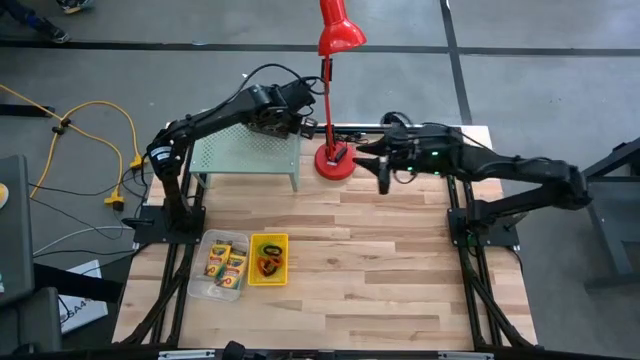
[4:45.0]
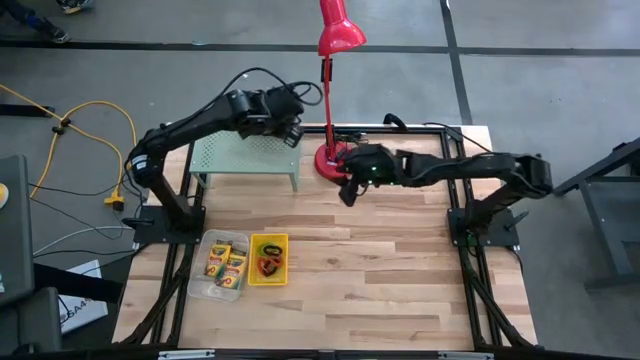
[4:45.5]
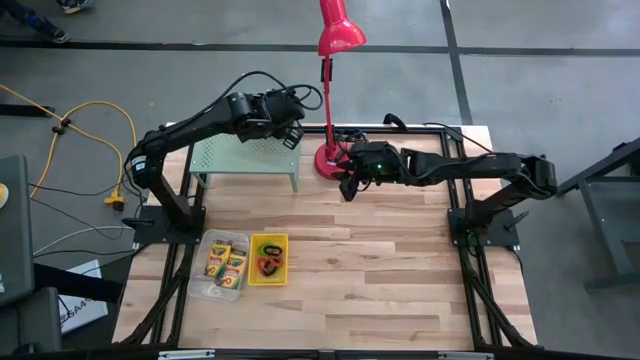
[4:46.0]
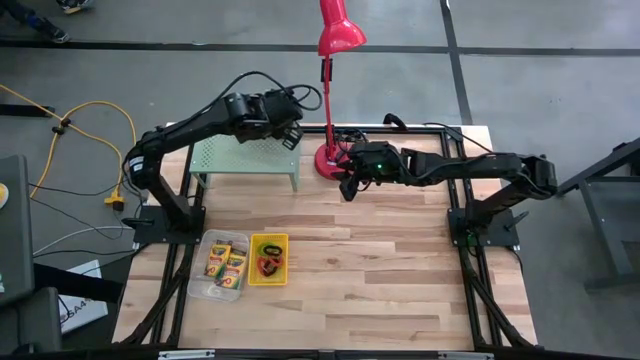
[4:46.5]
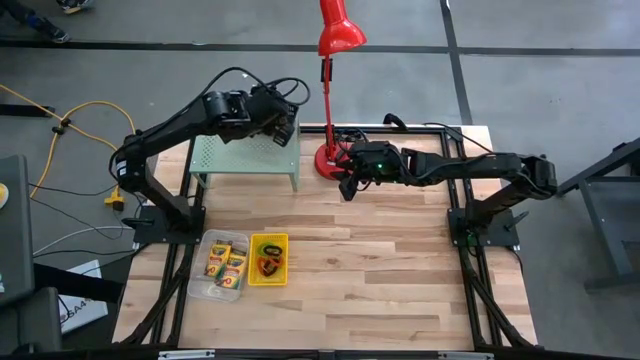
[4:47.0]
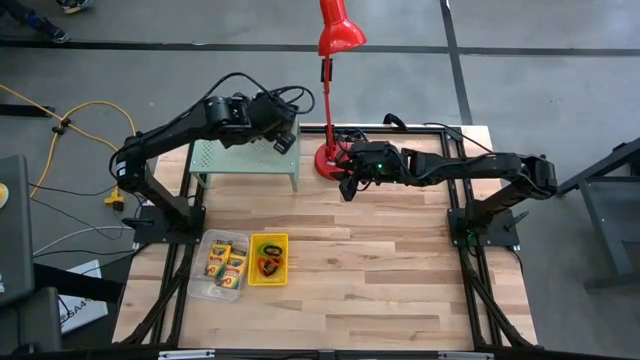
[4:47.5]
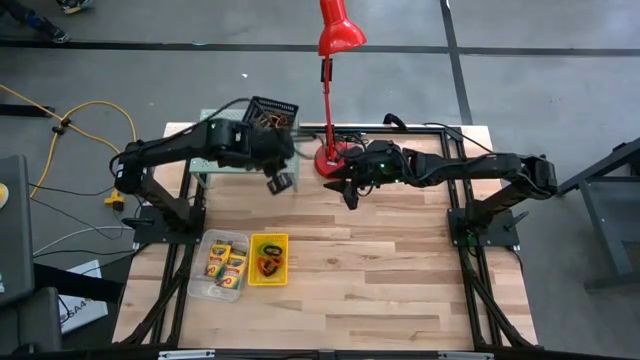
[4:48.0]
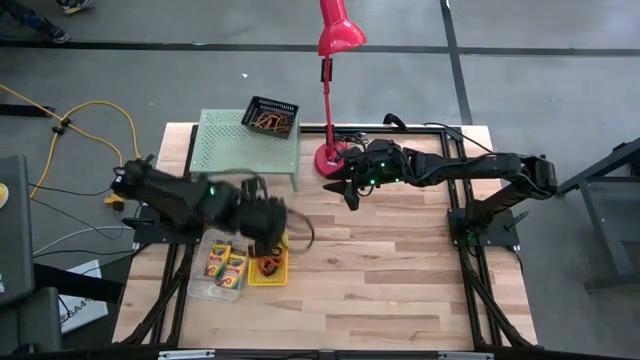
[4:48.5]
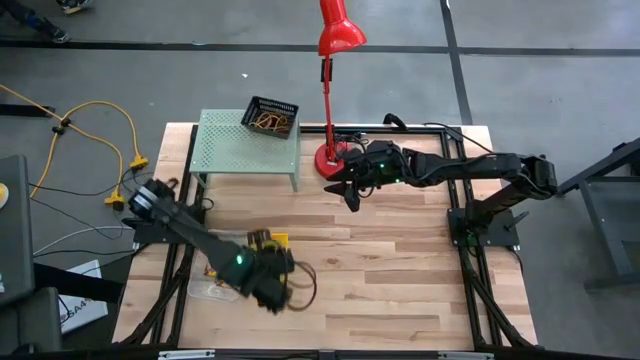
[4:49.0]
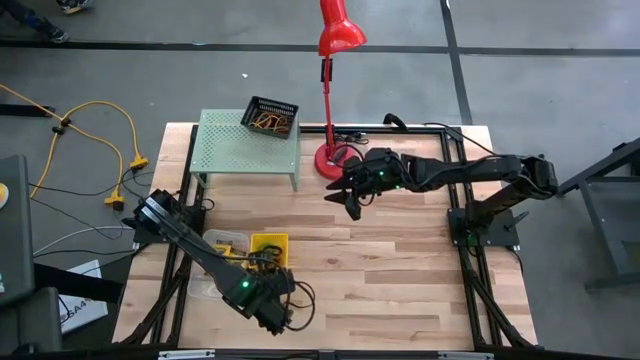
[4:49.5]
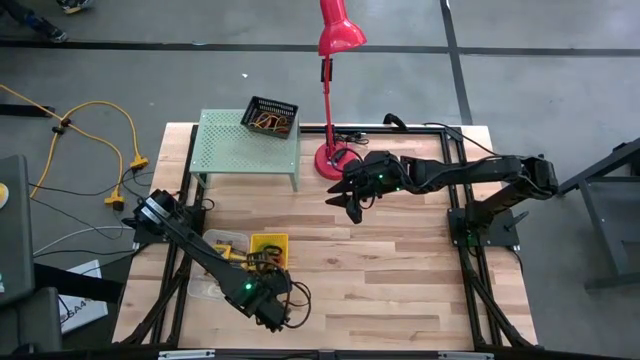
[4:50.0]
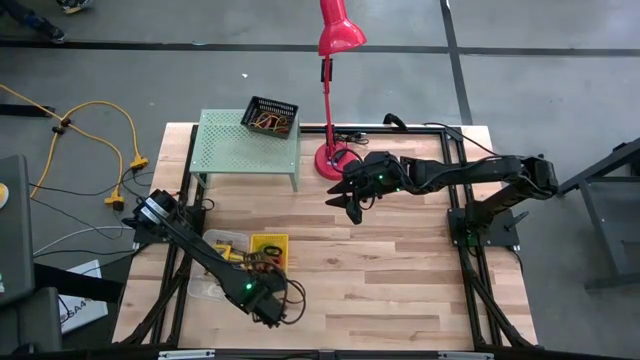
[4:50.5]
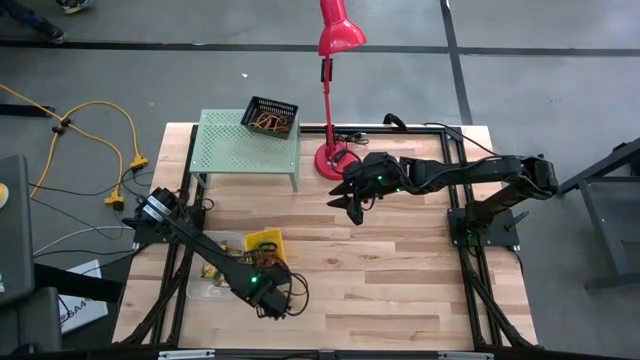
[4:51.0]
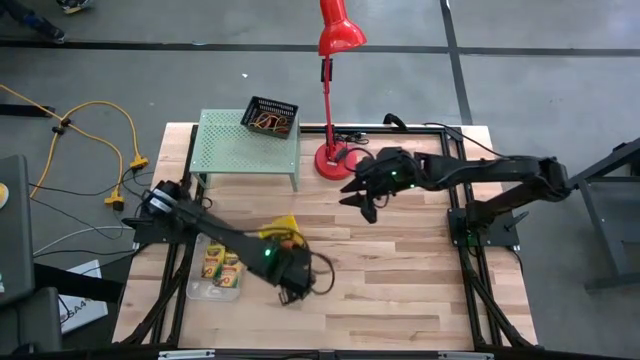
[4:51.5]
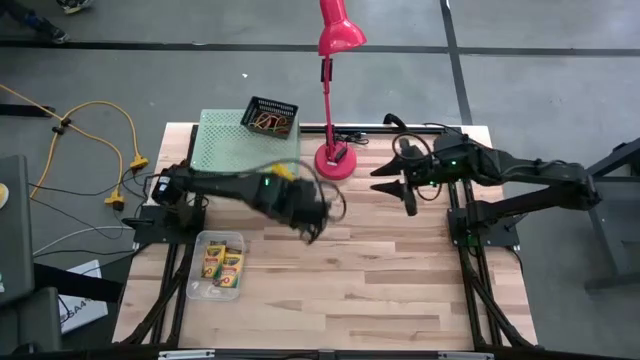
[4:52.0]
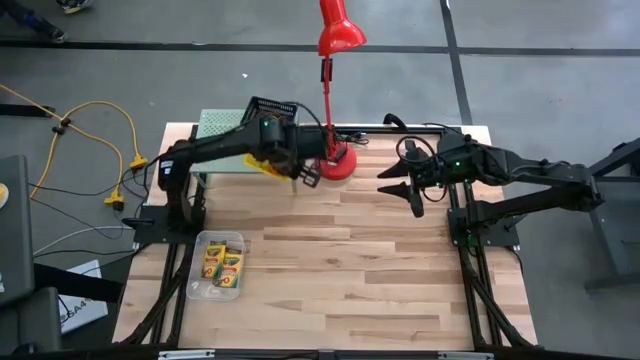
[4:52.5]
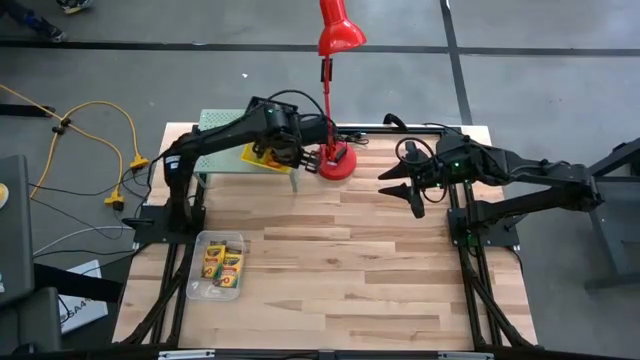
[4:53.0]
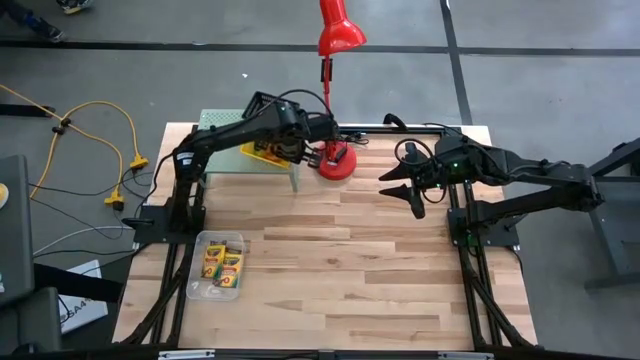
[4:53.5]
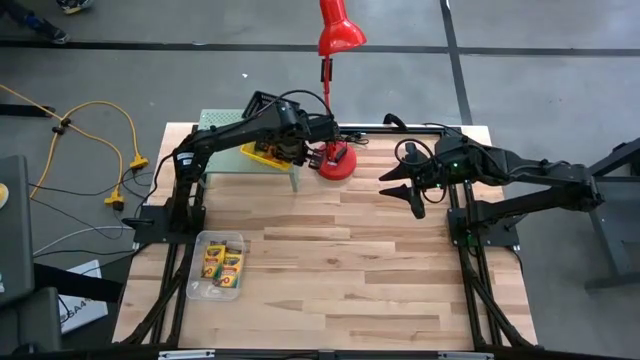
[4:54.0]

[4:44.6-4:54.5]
Task: Pick & Place Office Desk Supplies
Put the yellow bin with spring keychains on the shelf

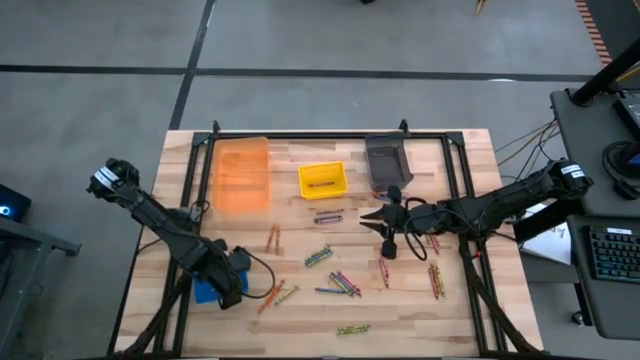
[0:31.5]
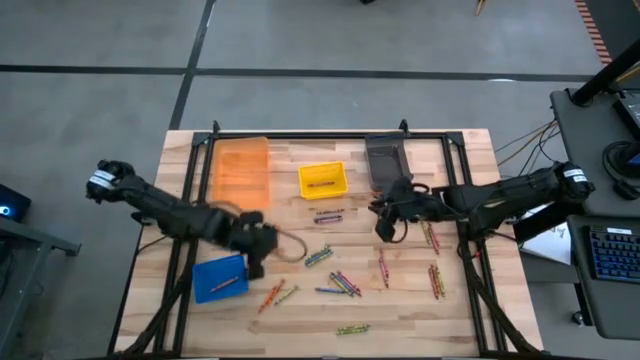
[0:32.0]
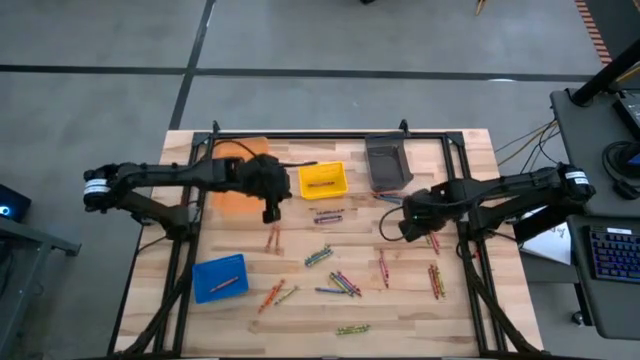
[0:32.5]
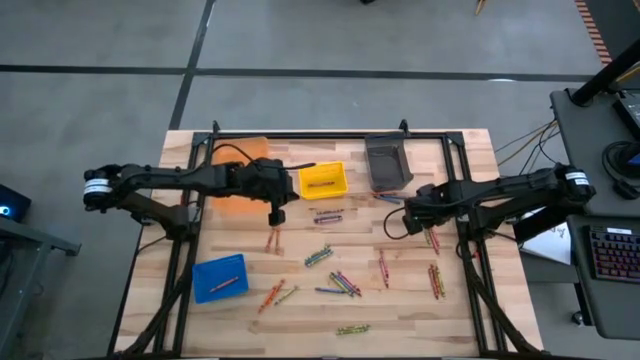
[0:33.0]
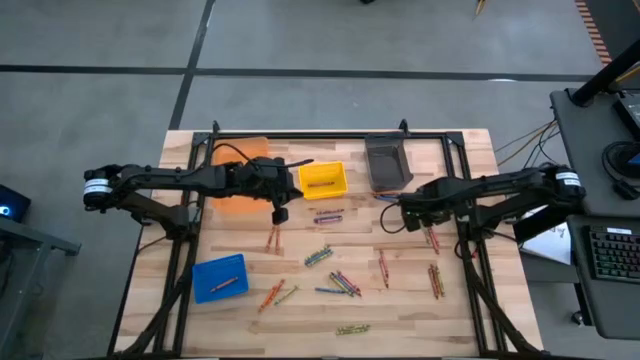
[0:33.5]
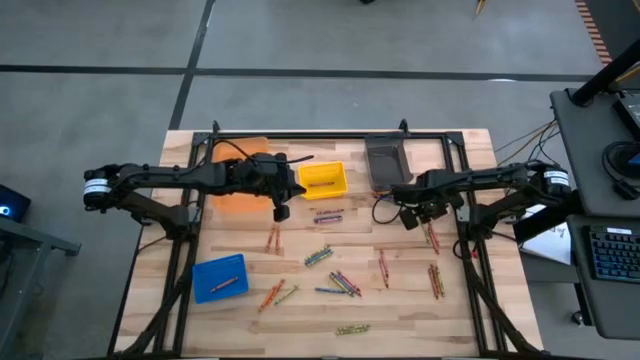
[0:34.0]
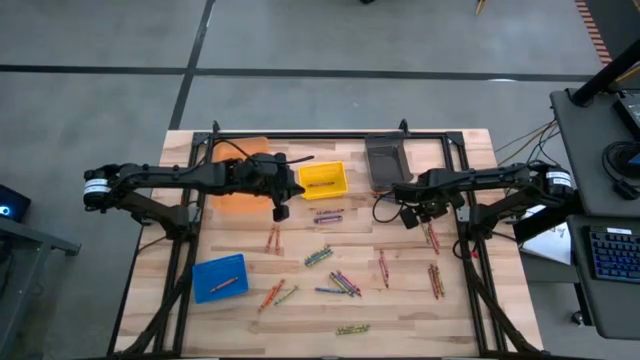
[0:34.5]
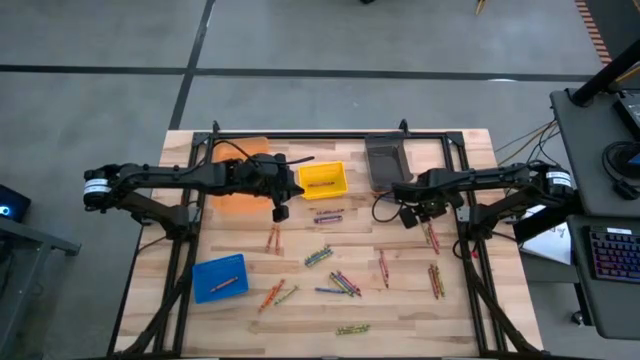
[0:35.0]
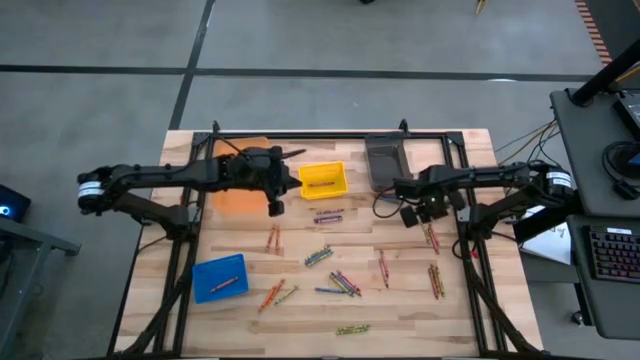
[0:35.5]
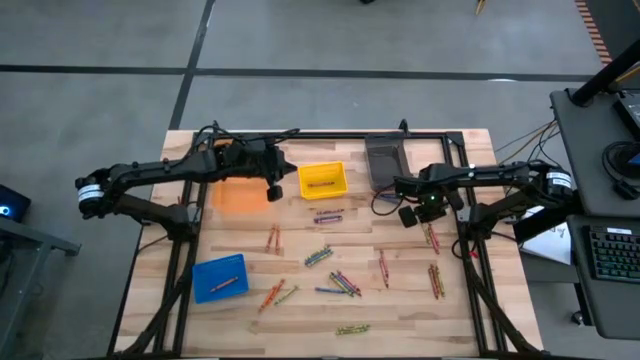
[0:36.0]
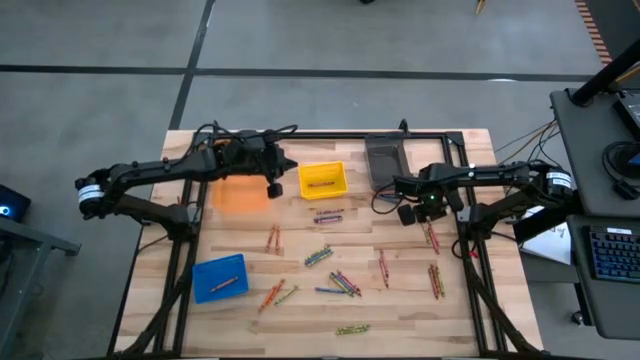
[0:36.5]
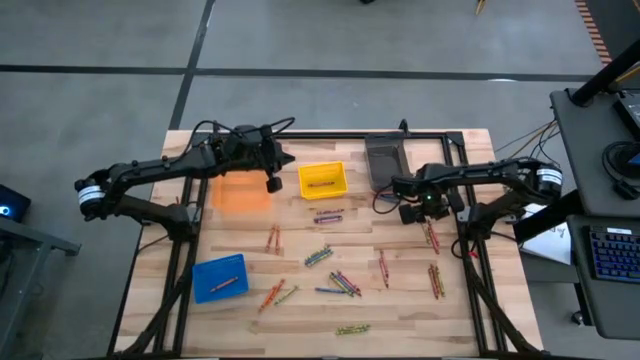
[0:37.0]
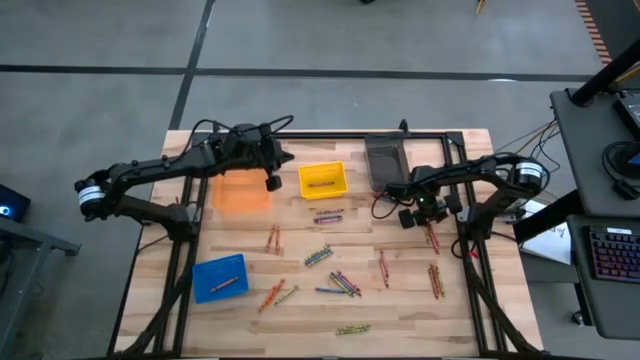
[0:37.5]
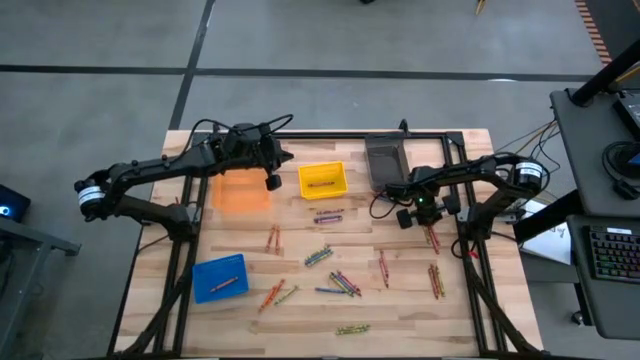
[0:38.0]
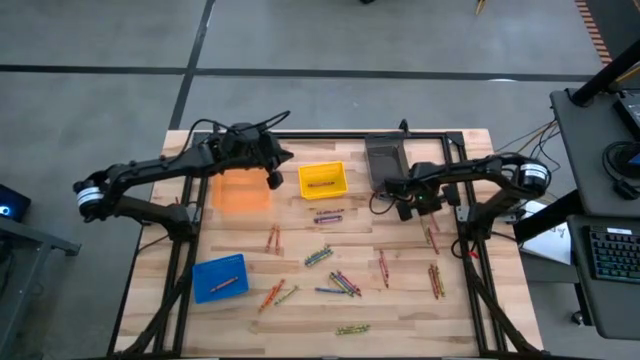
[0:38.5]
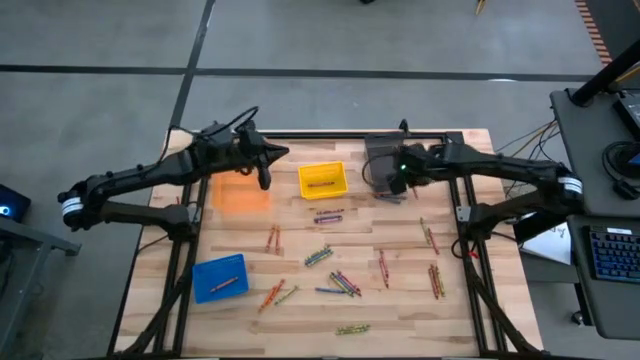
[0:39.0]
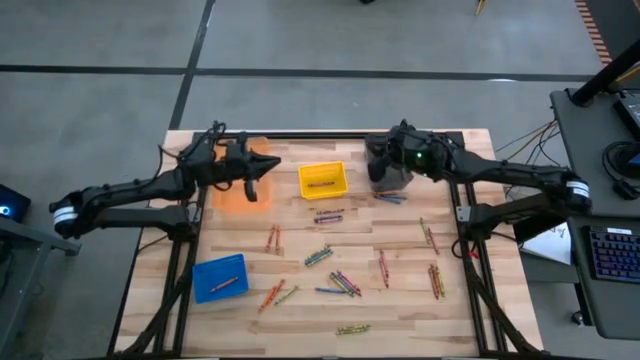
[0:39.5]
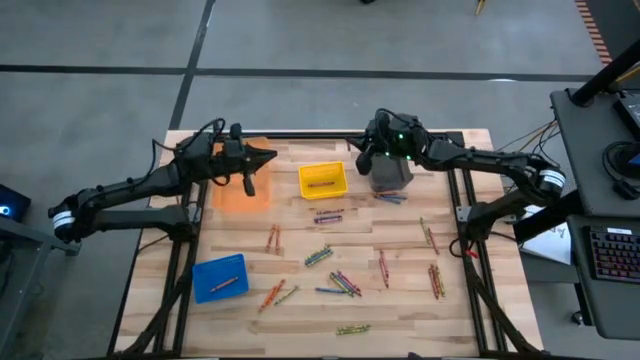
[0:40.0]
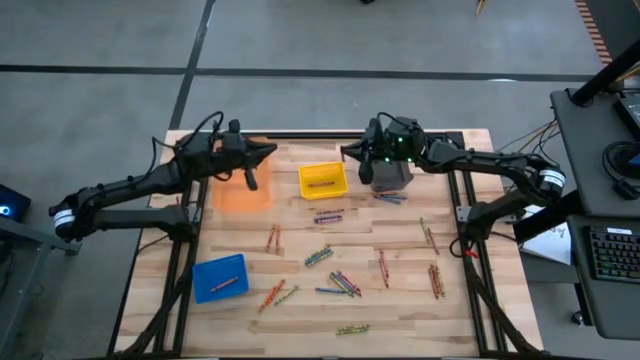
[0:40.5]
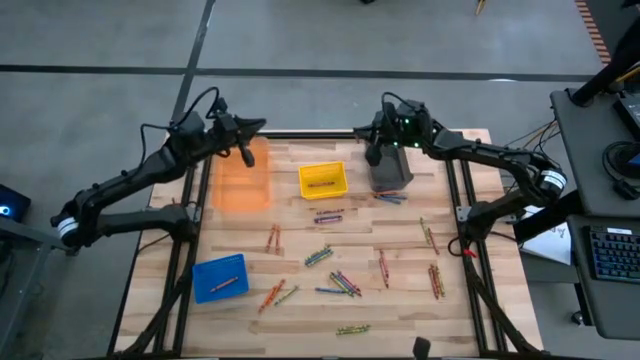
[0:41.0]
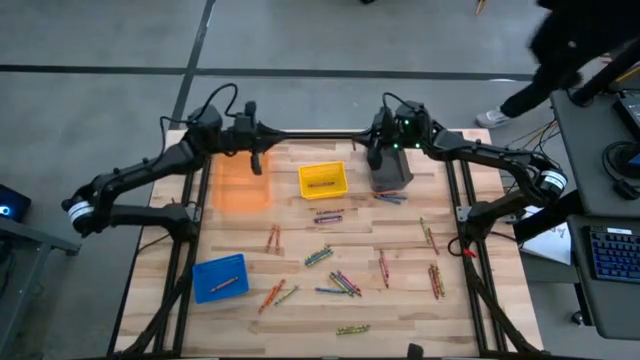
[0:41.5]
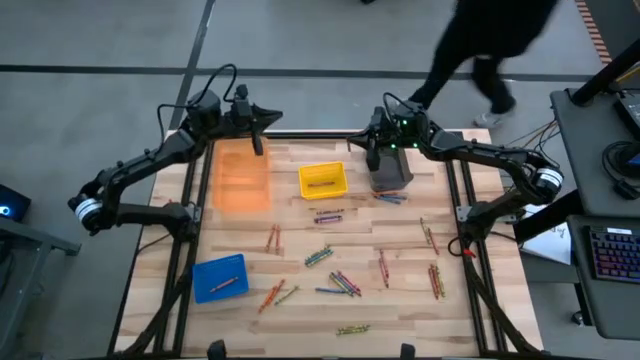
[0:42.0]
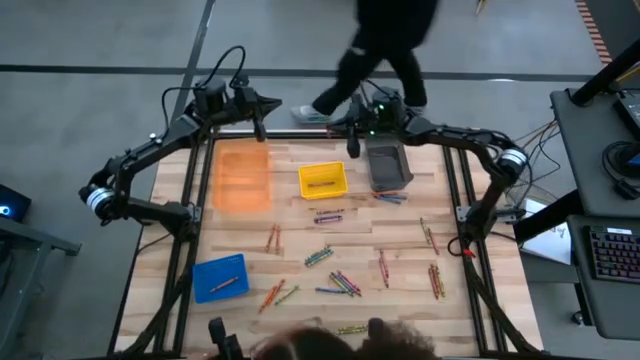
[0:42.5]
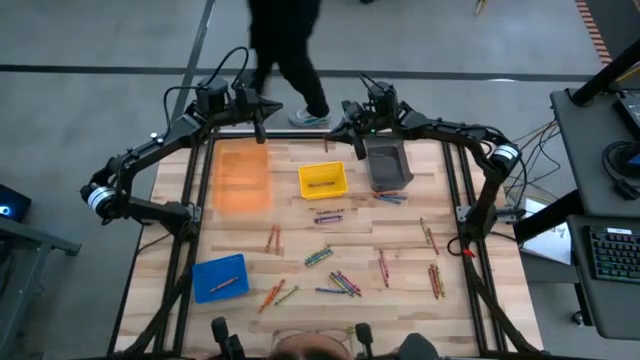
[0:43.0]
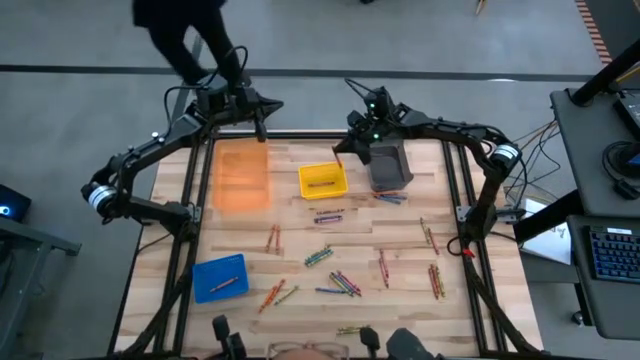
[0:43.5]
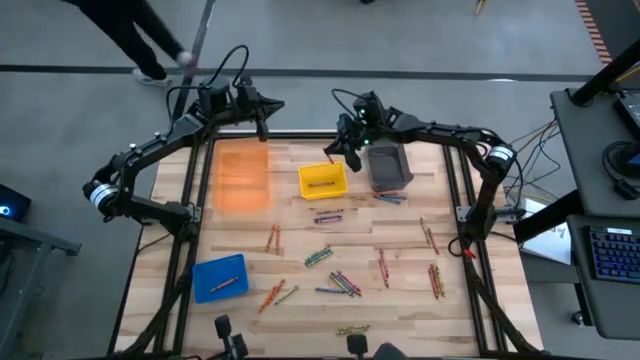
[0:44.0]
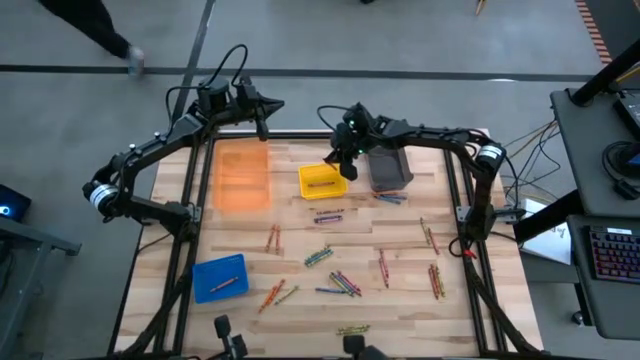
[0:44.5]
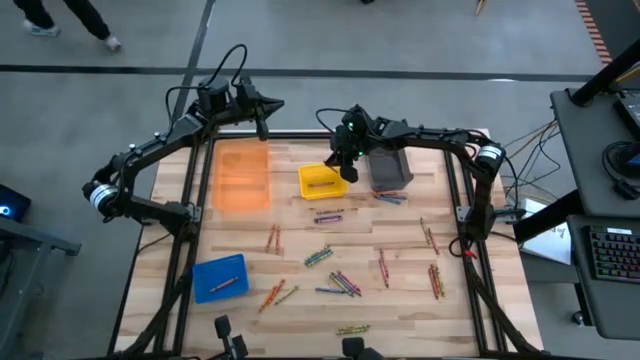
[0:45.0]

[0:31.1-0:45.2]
Task: Sort crayons
Put the red crayon into the yellow bin
